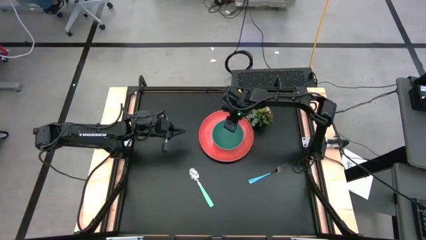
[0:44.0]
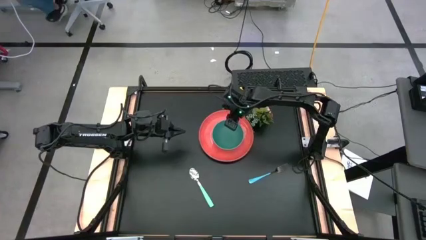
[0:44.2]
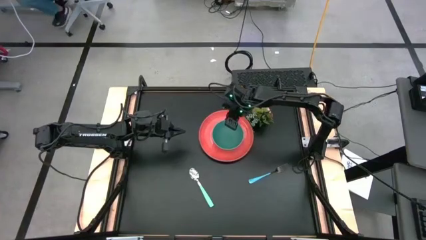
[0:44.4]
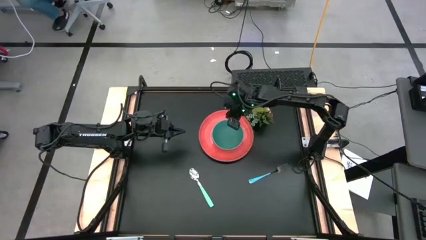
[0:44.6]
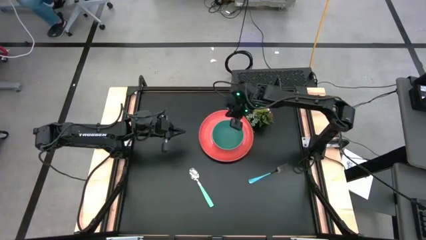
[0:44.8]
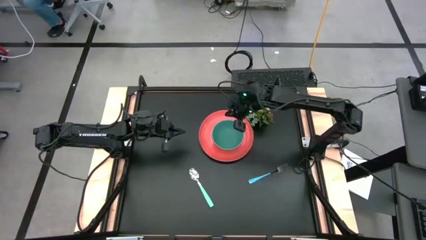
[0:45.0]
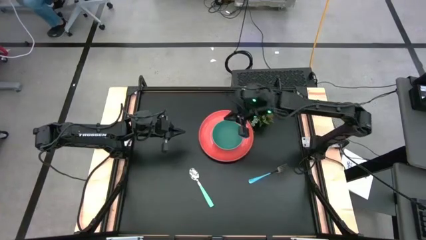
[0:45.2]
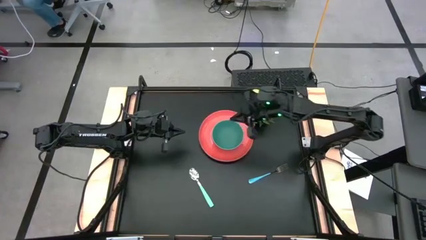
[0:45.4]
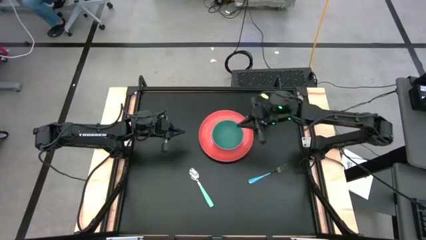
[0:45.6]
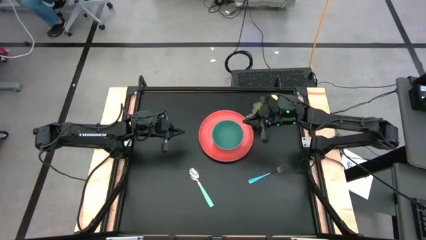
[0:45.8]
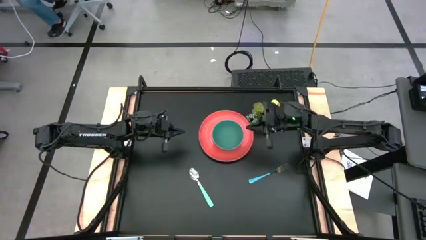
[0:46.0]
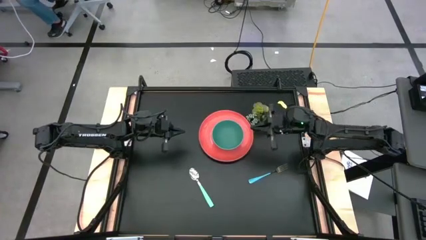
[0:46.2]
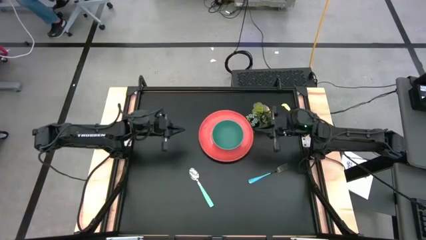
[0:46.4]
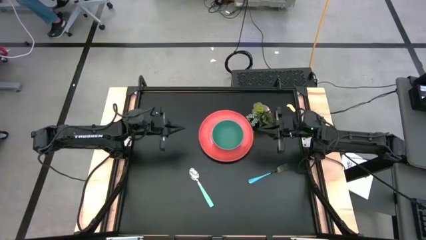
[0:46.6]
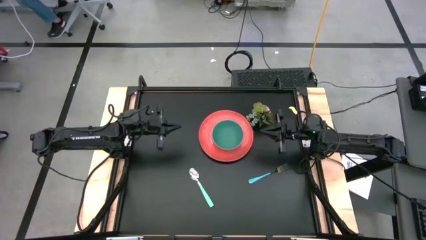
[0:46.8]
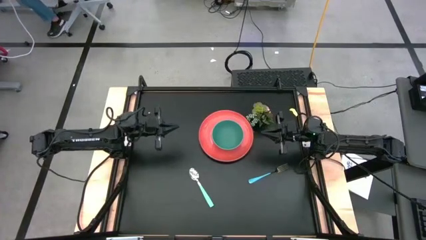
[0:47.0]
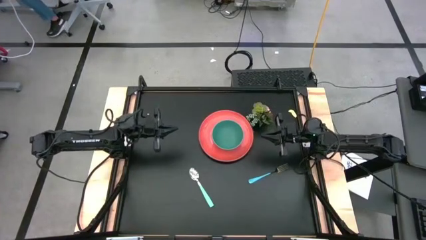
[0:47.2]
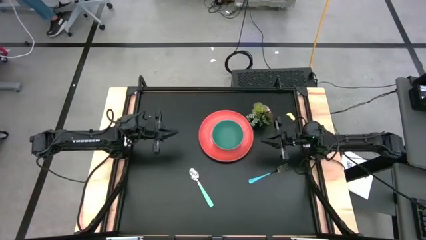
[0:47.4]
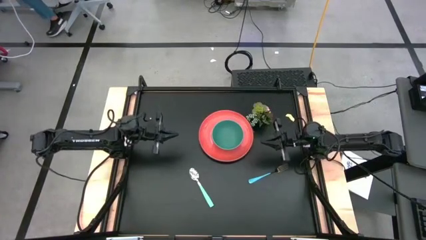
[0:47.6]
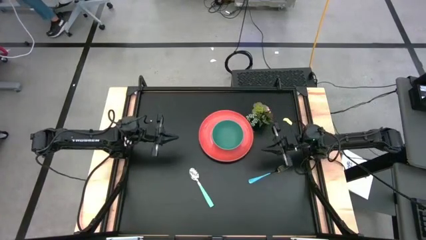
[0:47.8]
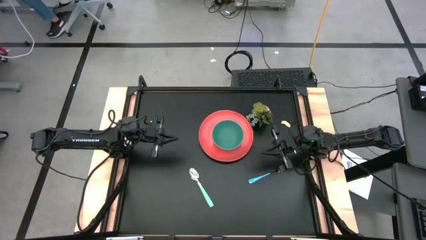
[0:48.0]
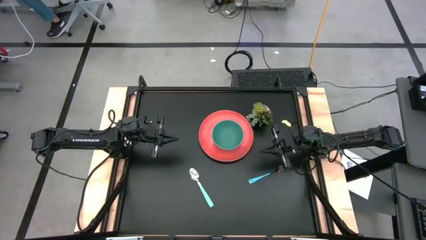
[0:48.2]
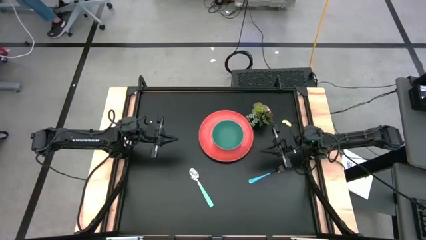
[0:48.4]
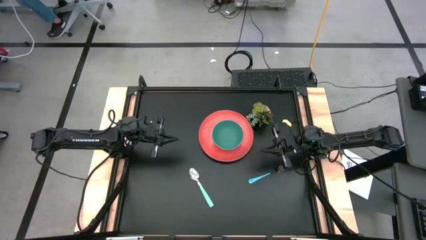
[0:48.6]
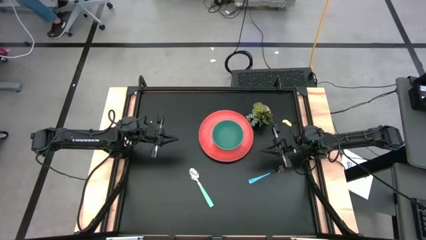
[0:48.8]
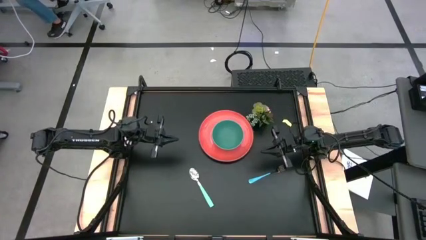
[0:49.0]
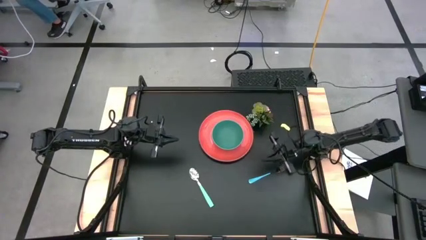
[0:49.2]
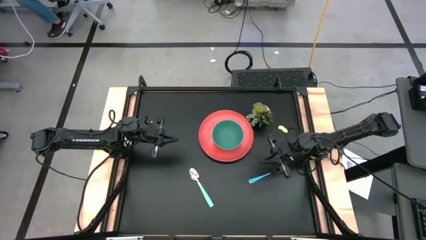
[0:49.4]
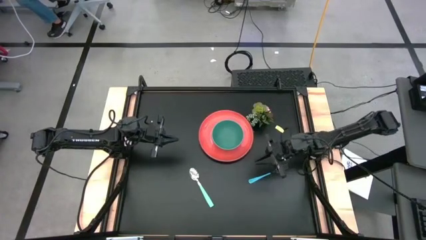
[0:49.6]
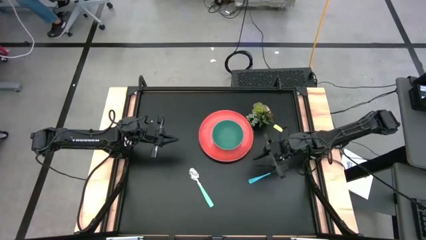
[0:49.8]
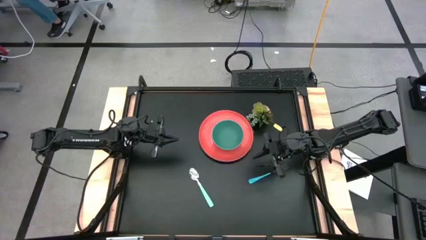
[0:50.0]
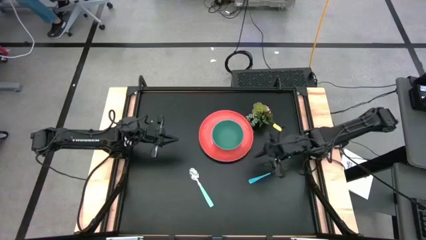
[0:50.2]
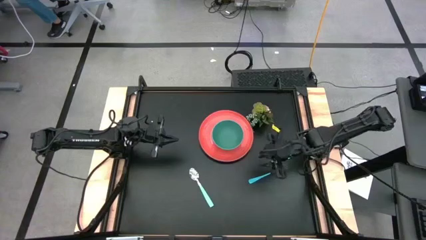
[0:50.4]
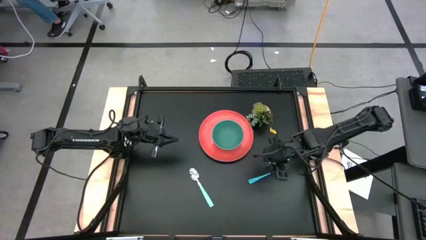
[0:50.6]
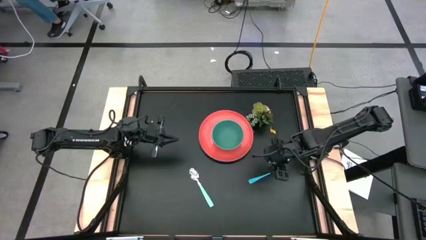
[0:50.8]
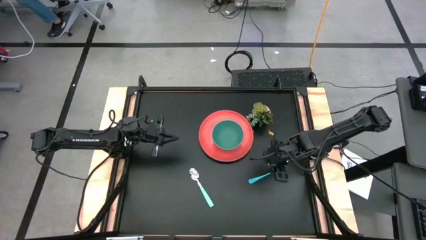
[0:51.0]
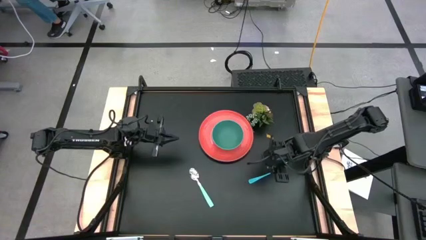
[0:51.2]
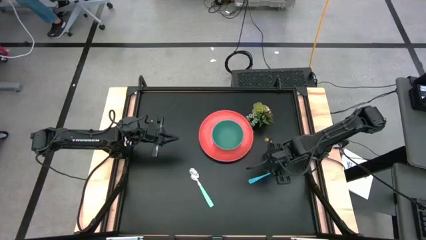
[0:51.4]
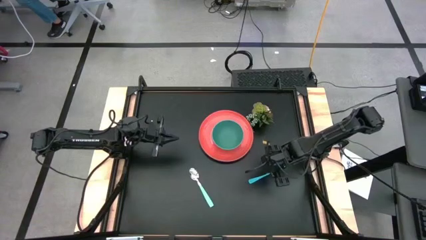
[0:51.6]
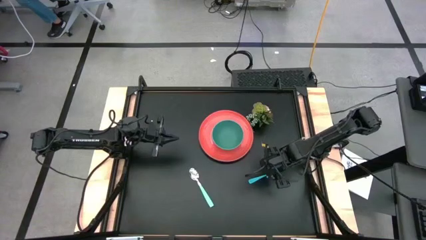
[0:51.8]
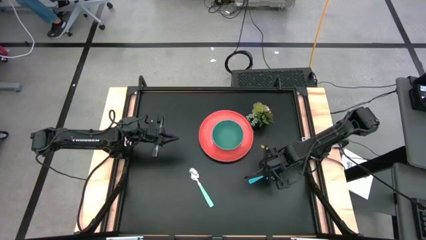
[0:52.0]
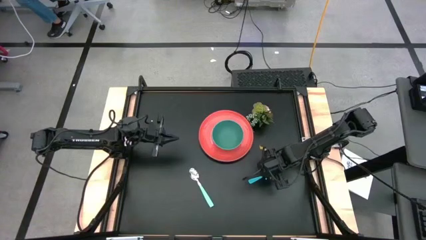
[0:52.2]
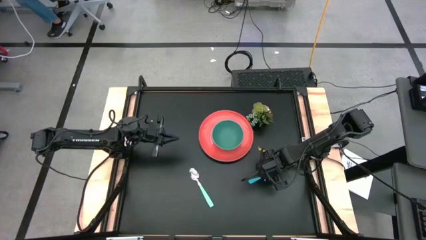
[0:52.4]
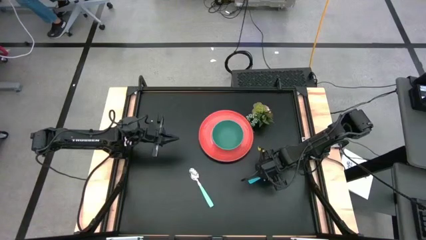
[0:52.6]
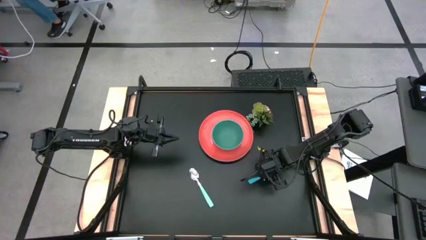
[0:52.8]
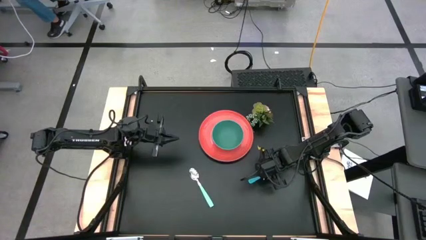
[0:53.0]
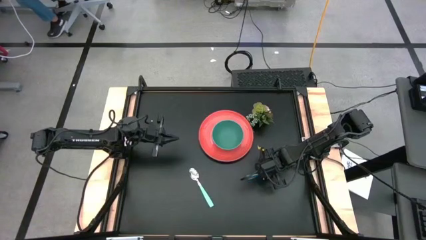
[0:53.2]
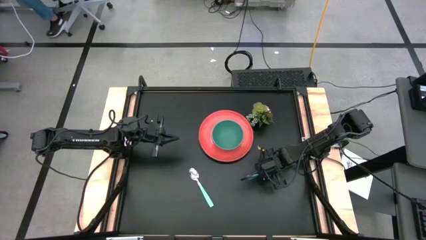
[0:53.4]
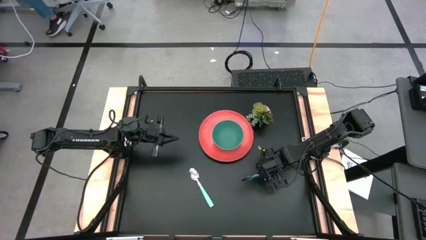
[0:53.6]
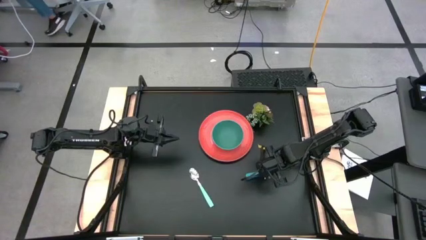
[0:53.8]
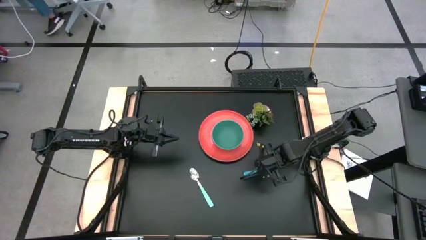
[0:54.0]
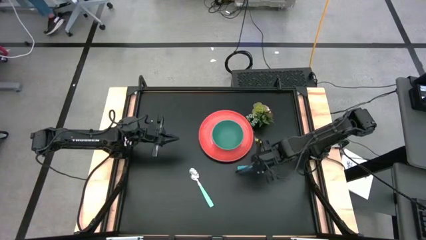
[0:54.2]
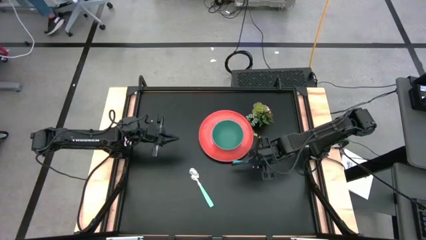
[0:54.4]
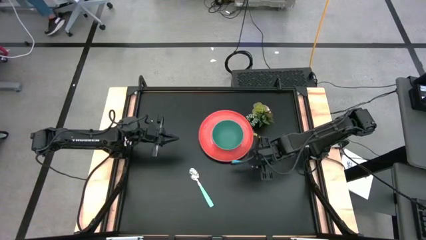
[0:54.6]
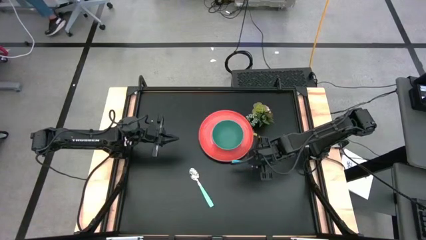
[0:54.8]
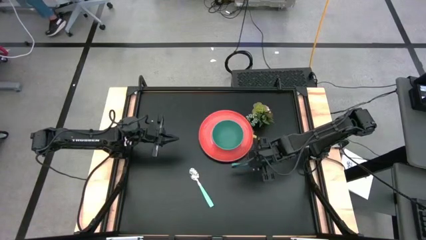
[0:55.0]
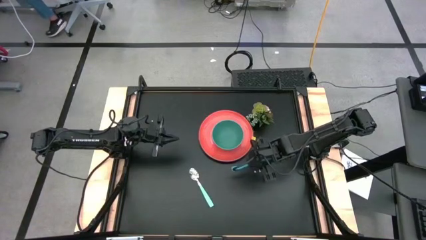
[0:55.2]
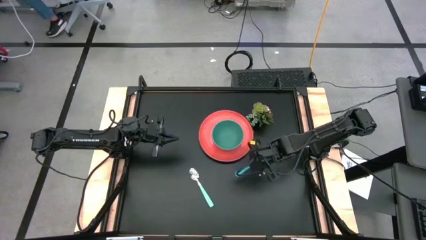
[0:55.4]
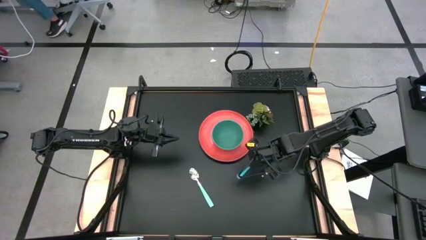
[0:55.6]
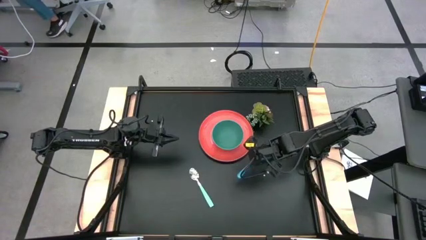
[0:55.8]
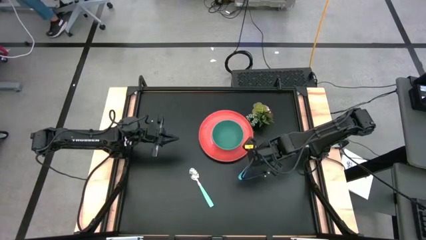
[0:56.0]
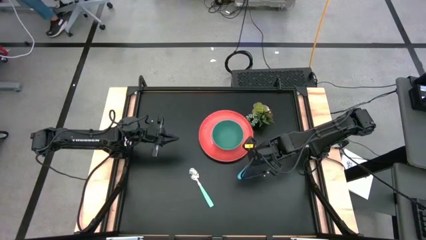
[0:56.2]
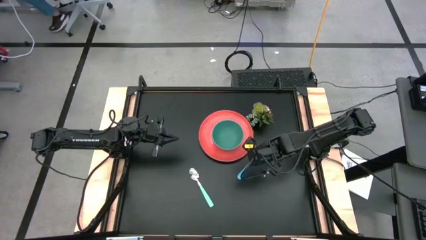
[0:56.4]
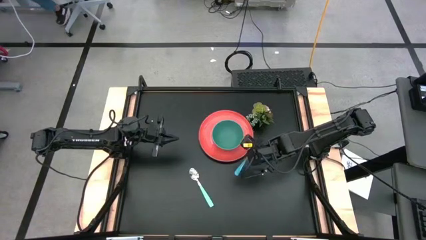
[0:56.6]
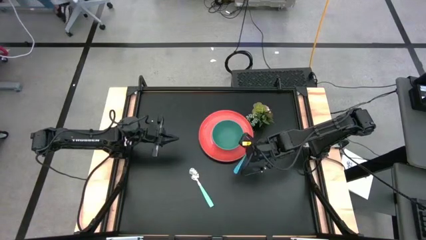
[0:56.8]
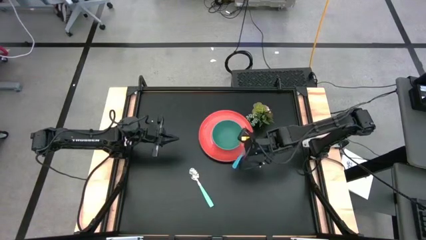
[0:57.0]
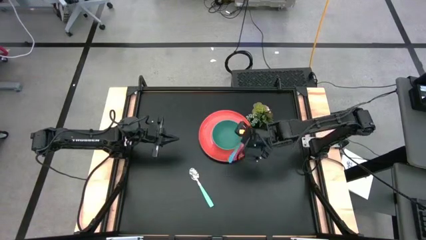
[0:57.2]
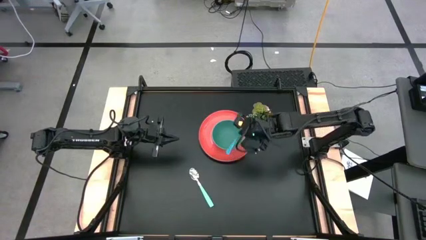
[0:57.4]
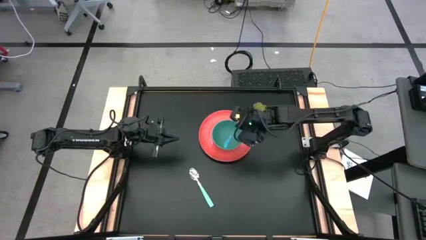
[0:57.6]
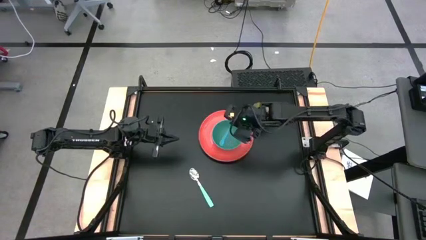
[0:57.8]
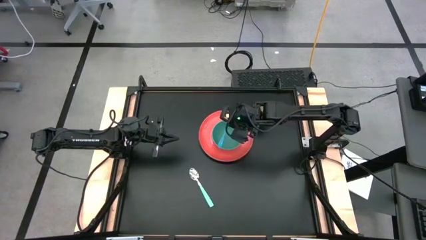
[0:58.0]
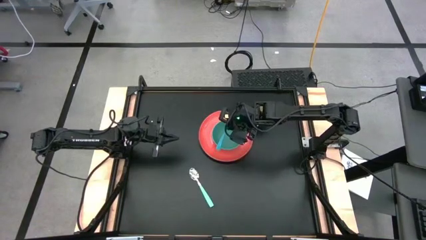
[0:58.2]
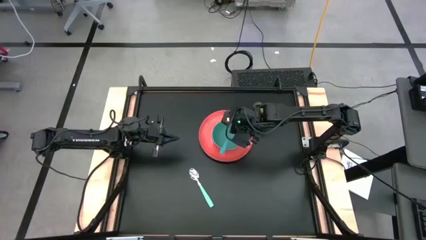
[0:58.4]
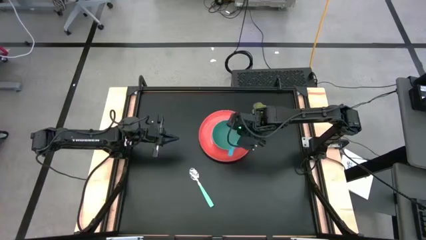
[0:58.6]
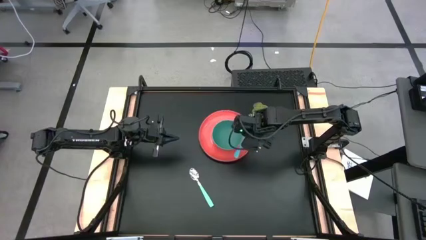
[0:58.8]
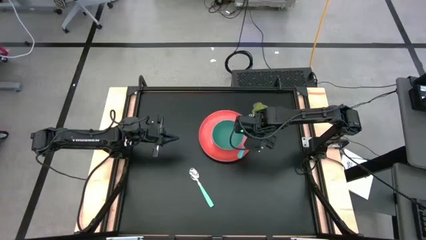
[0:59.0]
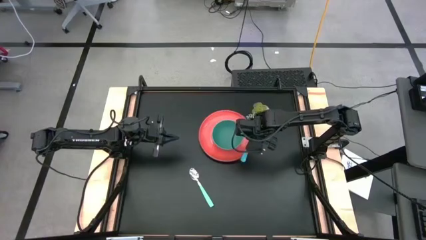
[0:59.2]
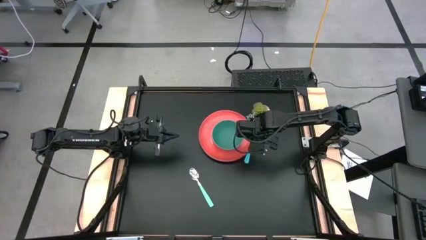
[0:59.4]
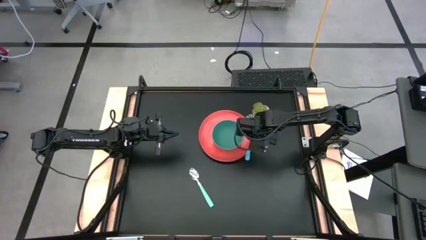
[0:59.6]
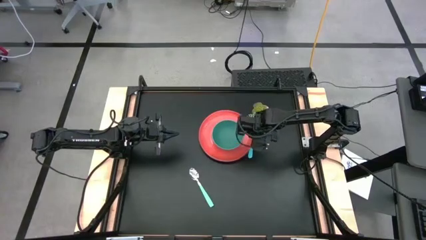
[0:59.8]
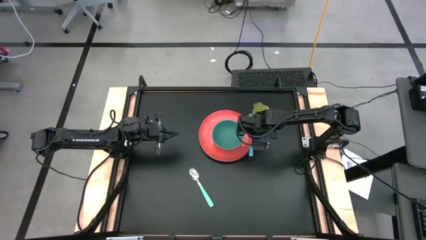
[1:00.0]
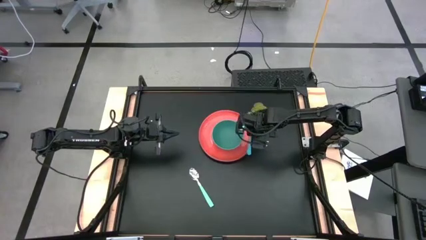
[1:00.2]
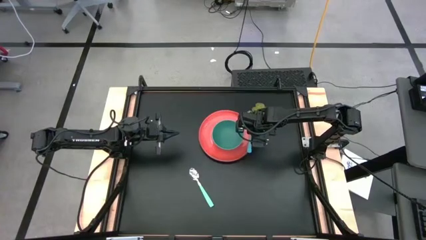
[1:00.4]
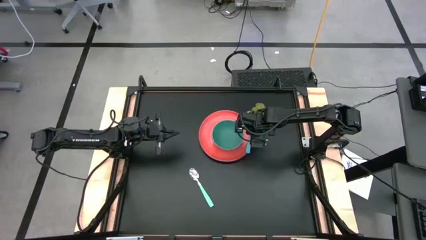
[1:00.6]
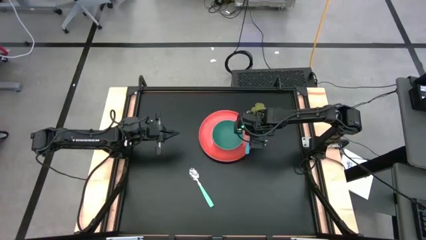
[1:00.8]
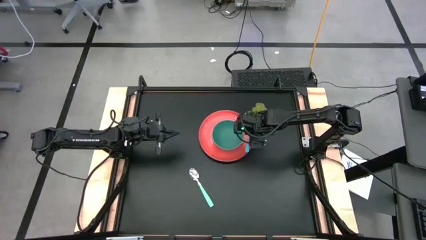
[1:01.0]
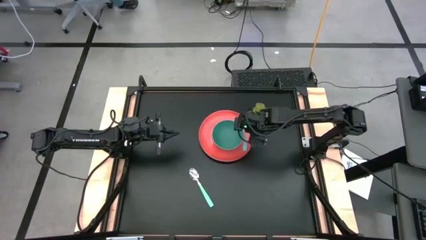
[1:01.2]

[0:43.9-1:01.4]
Task: Set table place
Put the blue fork on the right side of the green bowl
